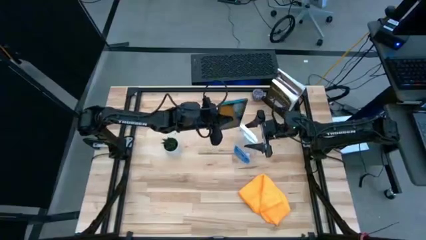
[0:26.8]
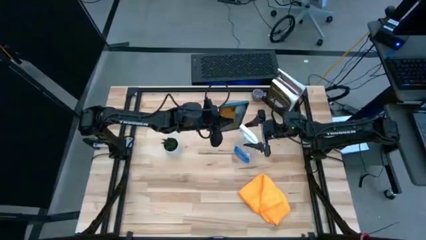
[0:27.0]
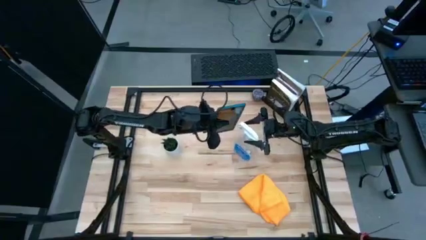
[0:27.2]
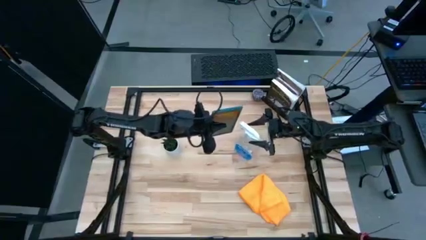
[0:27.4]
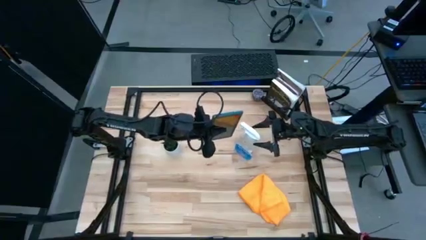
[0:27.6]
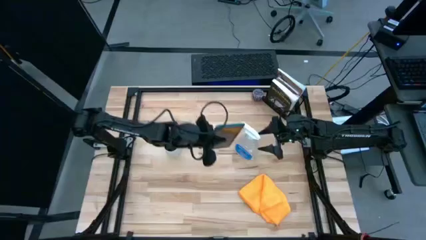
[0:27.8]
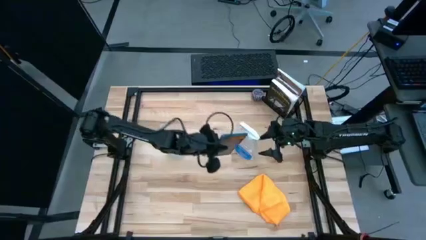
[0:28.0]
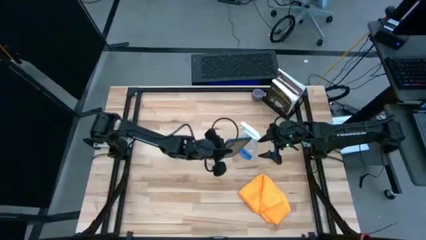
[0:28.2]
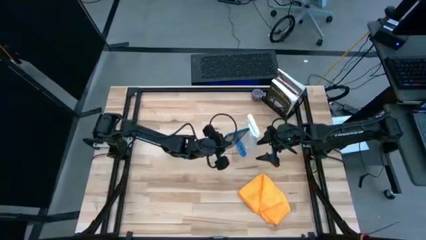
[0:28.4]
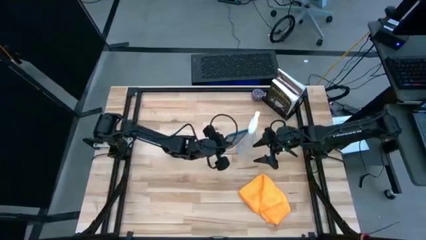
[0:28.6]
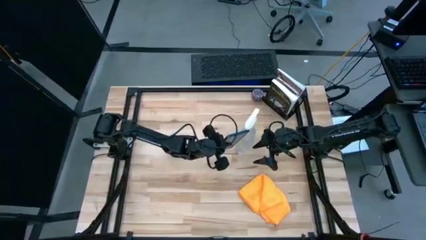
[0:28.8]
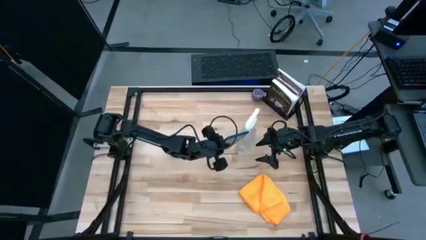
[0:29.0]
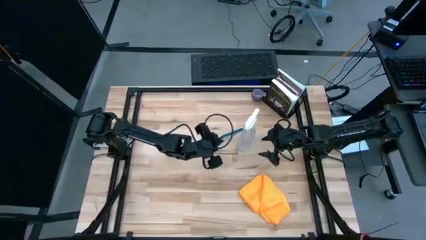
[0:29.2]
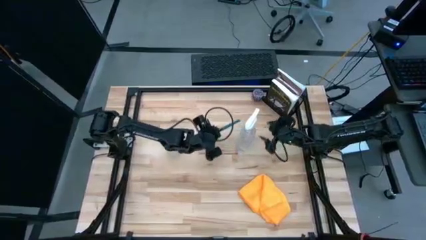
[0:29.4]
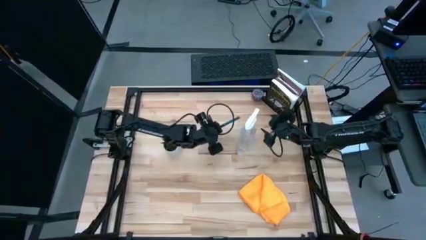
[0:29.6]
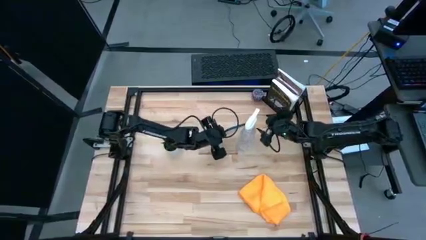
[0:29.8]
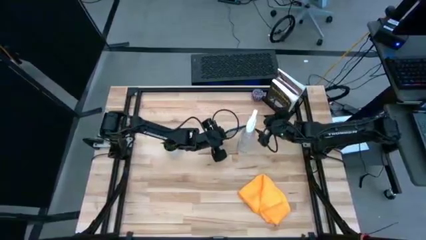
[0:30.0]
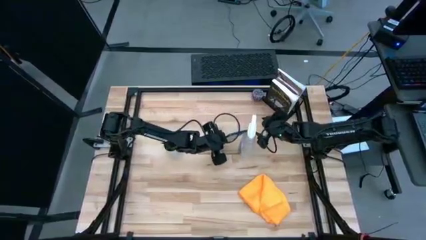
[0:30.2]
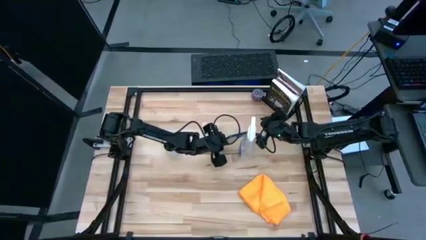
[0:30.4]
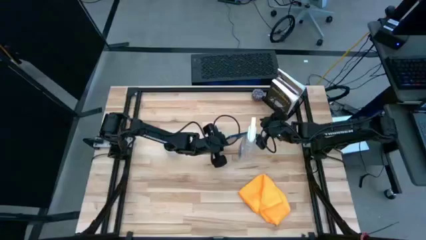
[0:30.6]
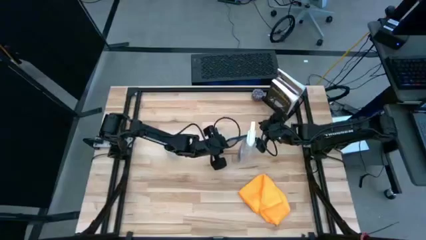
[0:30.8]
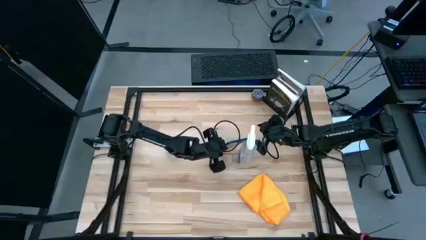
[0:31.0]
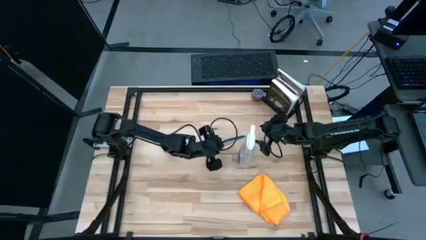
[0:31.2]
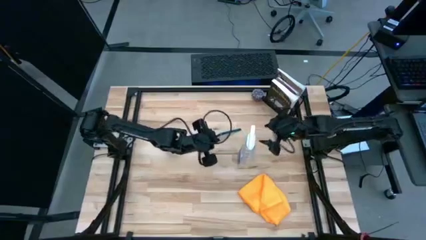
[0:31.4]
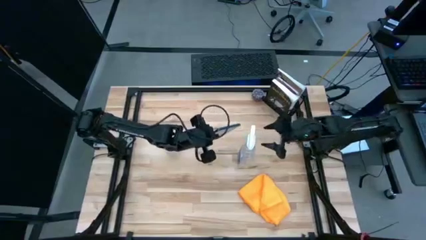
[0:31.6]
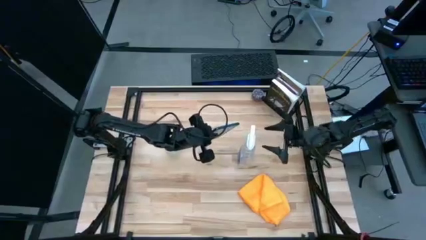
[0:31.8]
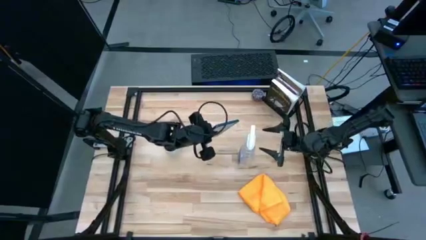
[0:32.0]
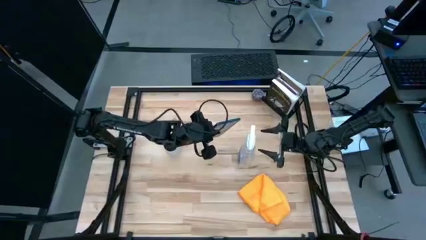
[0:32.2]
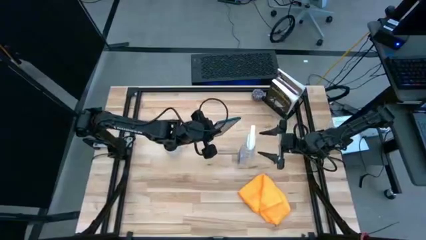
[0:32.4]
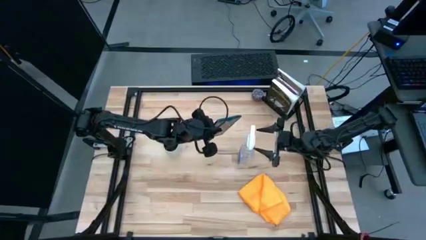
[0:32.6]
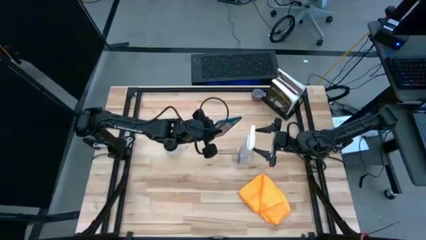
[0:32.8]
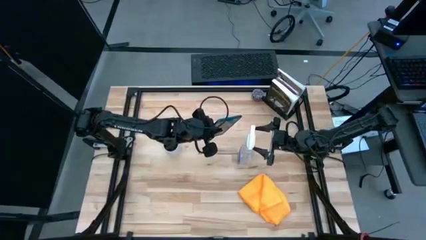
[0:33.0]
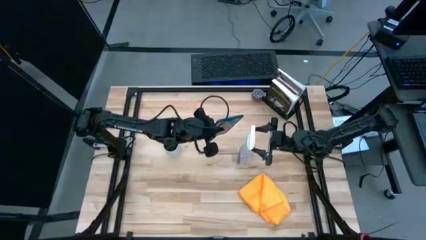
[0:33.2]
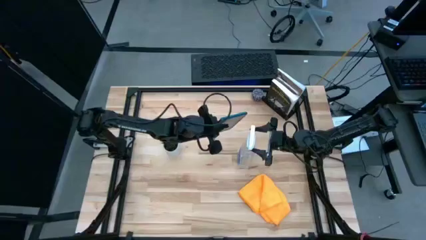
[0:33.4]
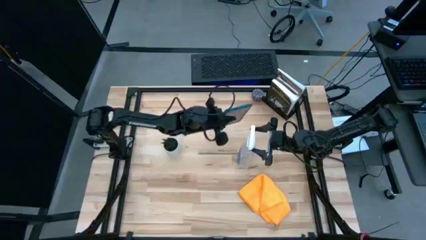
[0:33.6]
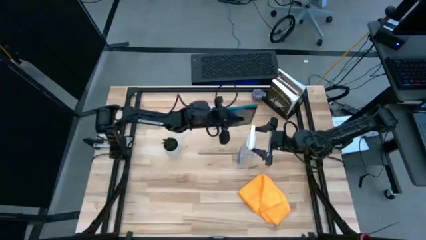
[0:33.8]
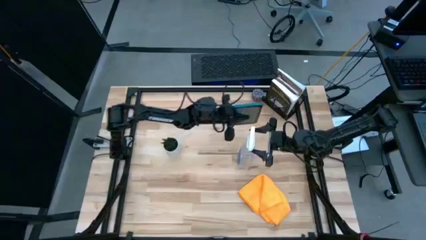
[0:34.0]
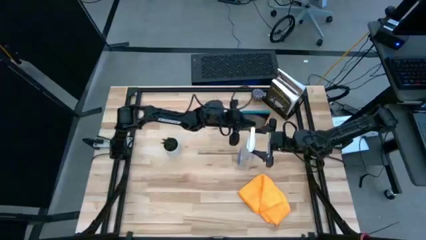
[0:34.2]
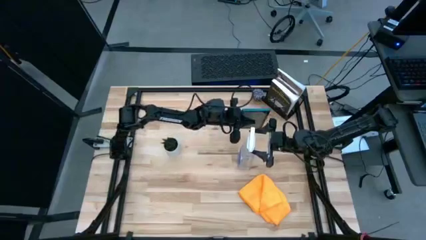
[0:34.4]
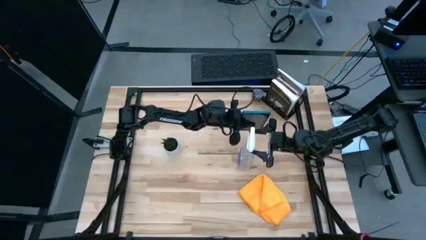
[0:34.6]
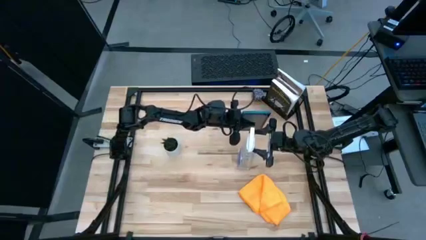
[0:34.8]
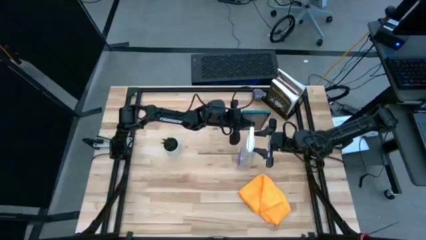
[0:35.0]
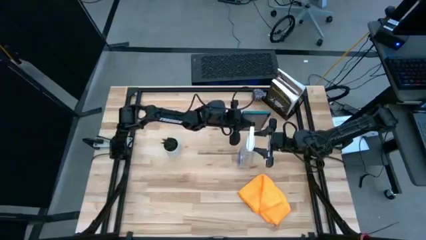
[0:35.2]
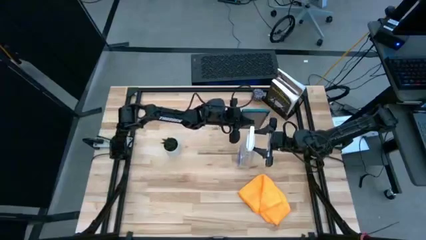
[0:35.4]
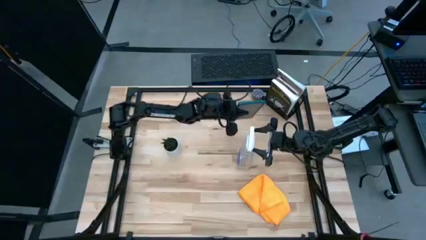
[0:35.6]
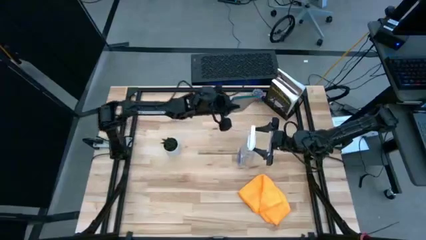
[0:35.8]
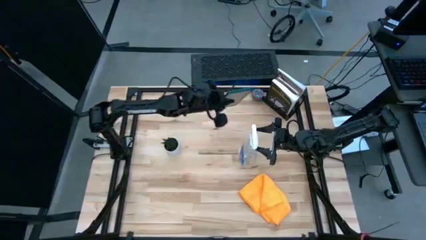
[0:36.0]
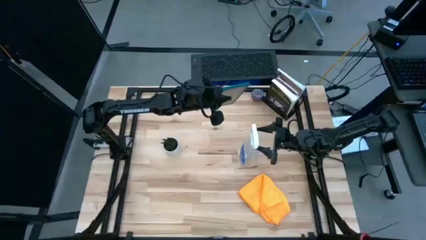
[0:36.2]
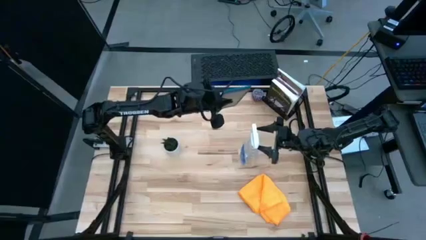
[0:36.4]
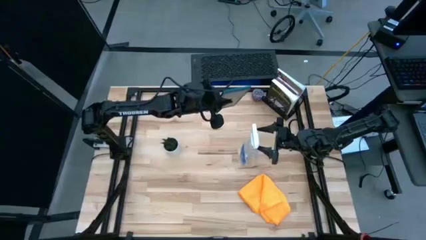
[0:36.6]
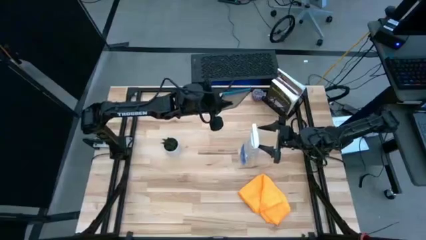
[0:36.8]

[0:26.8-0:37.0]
Task: Apply microfiber cloth
Spray the front tablet using the spray bottle

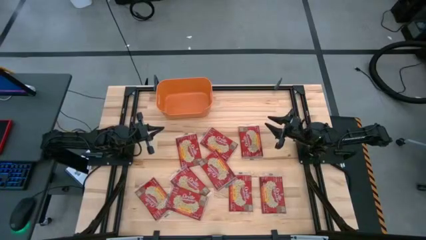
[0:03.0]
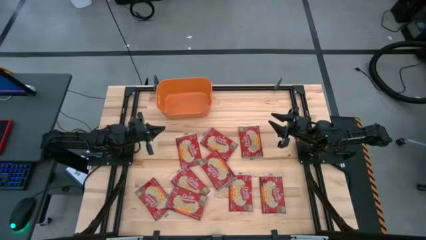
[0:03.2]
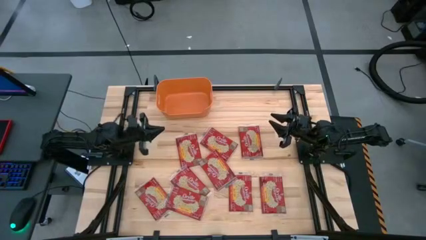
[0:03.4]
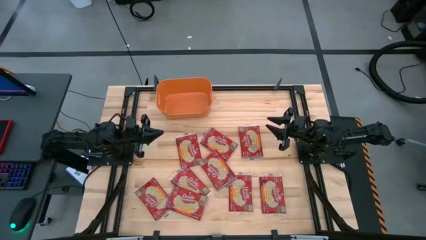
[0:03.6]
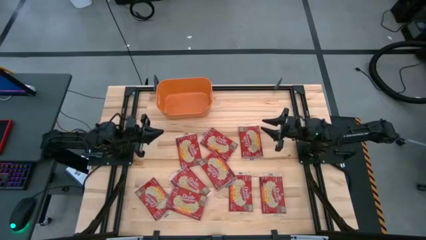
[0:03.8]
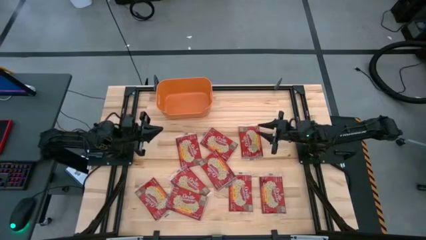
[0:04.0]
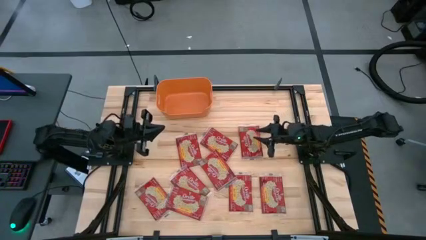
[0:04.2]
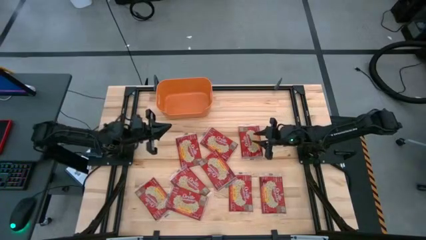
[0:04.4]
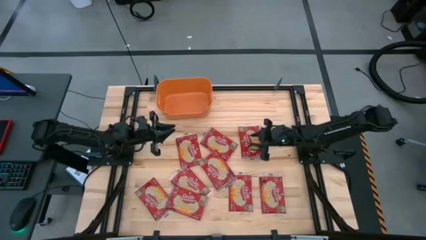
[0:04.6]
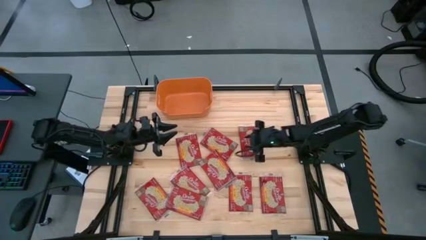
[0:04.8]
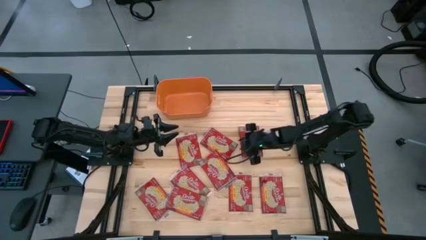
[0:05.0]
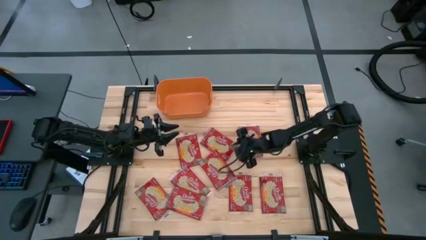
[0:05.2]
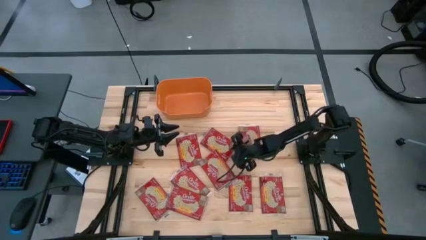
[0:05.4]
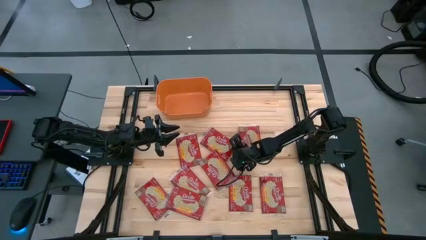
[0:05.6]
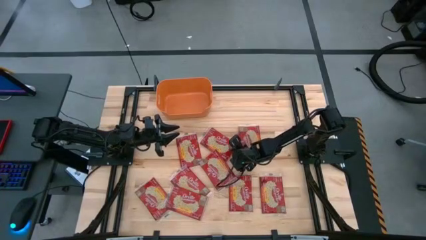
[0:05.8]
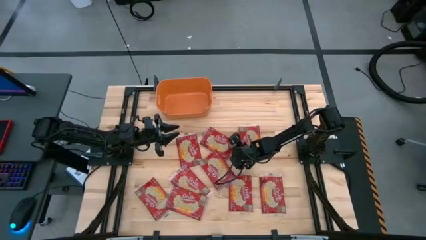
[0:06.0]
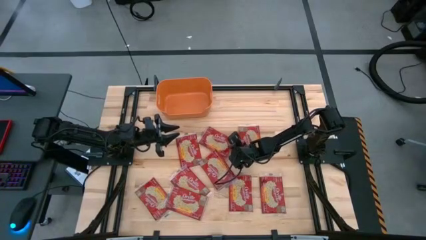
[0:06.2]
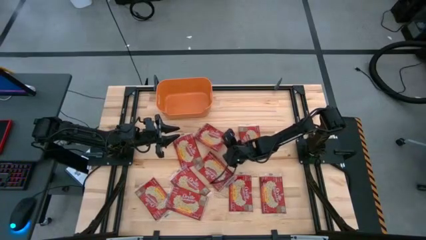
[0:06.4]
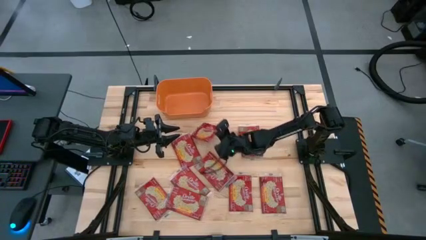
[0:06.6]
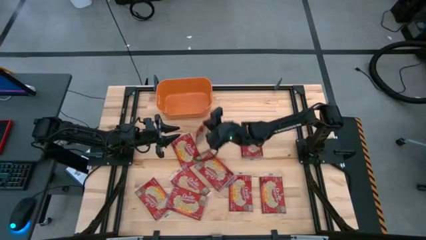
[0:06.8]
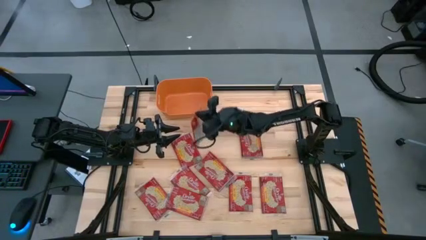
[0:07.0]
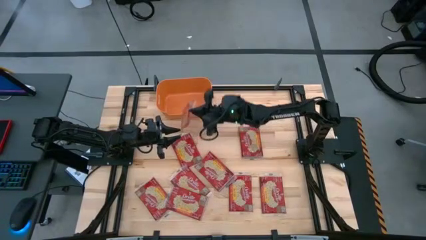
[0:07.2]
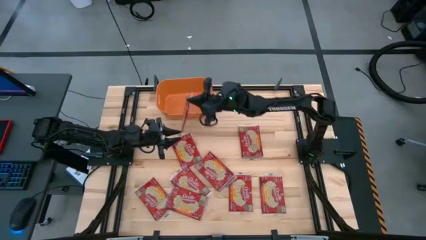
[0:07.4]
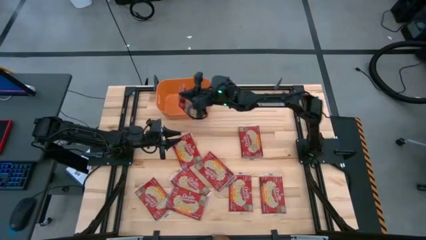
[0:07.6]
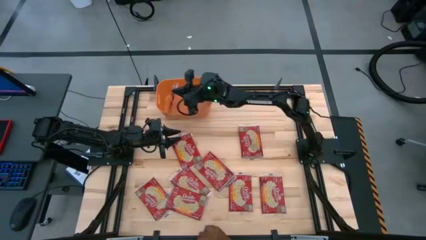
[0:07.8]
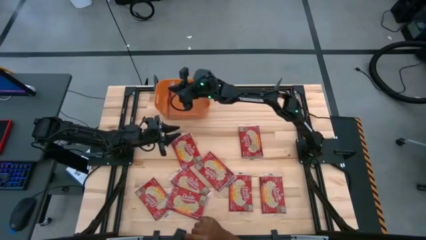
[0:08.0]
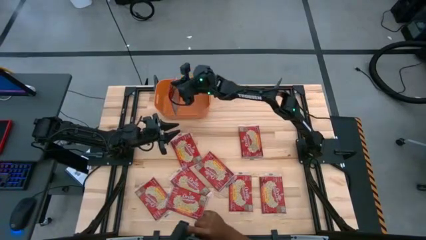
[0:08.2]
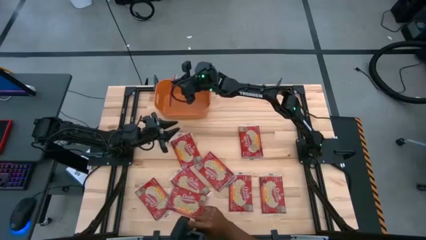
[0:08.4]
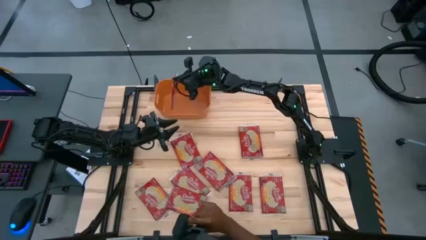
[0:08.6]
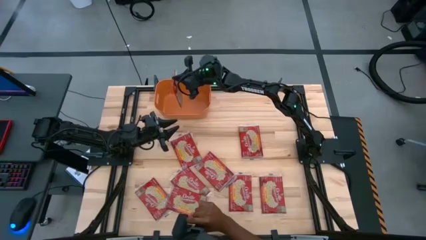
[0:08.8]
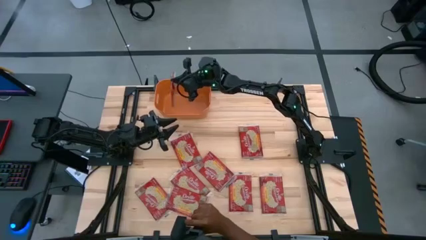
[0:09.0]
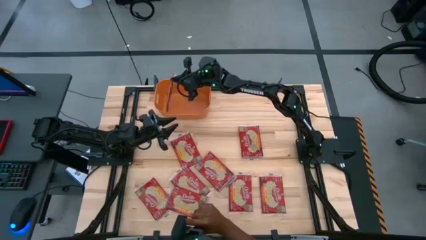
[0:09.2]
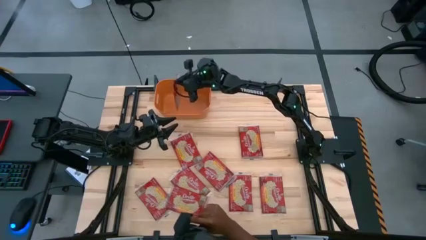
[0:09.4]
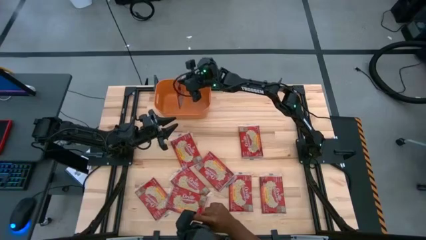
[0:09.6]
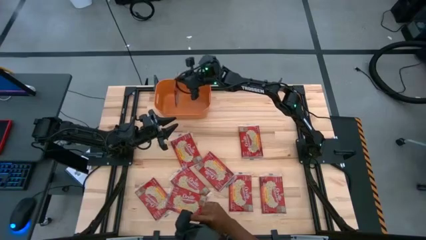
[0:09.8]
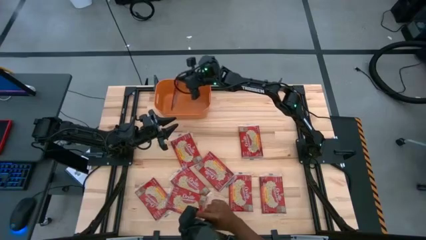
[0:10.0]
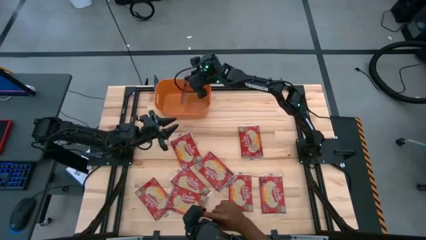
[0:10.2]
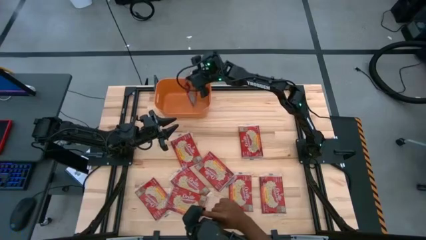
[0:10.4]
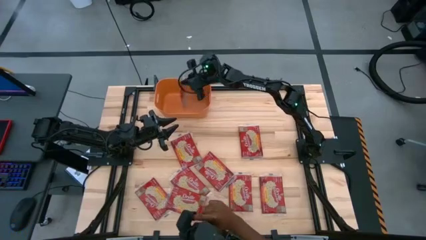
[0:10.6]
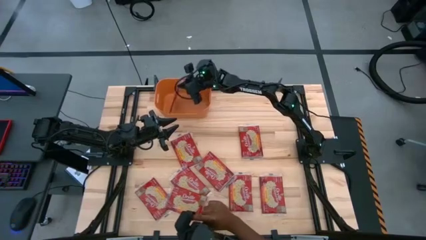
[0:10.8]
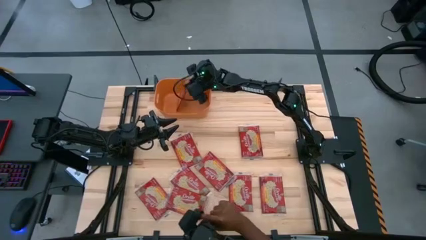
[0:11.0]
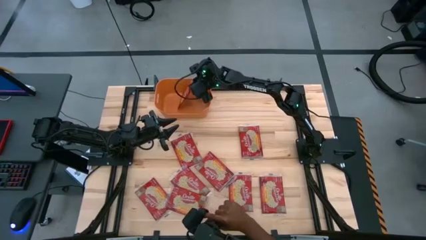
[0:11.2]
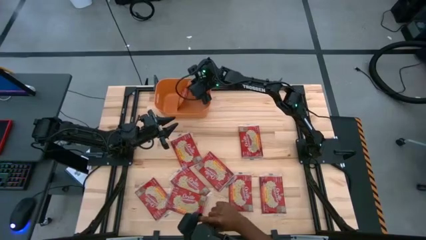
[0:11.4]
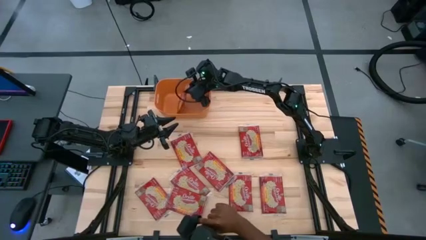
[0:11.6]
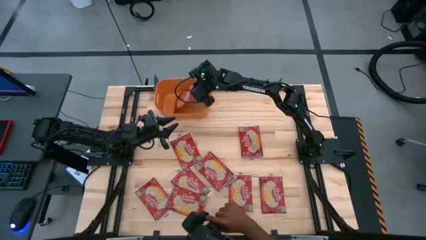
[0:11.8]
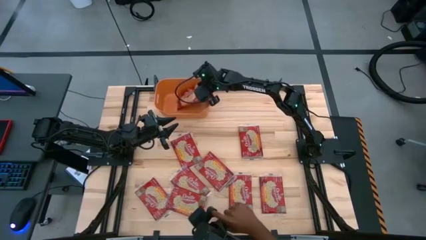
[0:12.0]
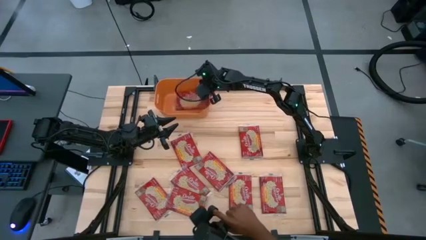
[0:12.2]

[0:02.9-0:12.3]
Task: Sort popcorn bags into baskets
Put the popcorn bag into the orange bin
